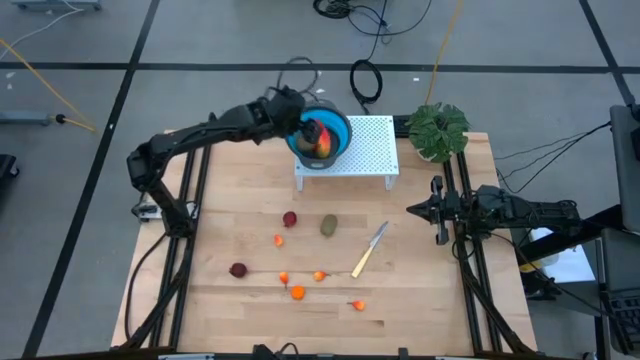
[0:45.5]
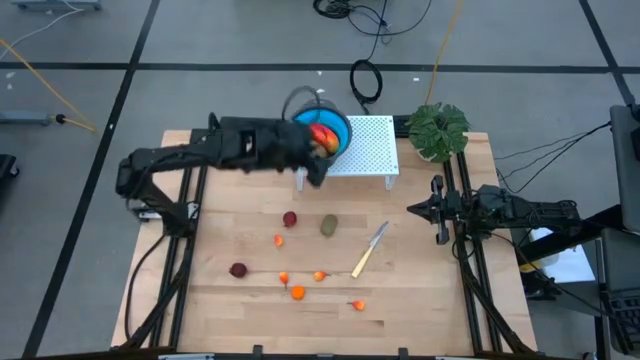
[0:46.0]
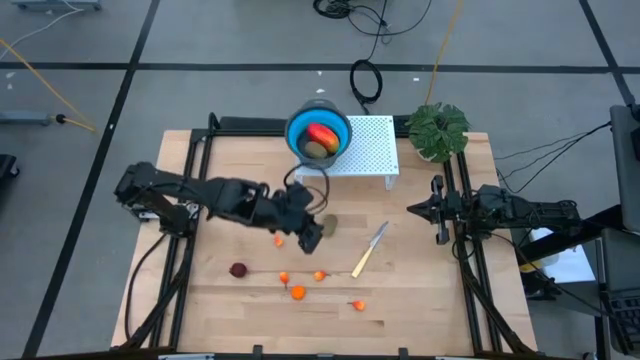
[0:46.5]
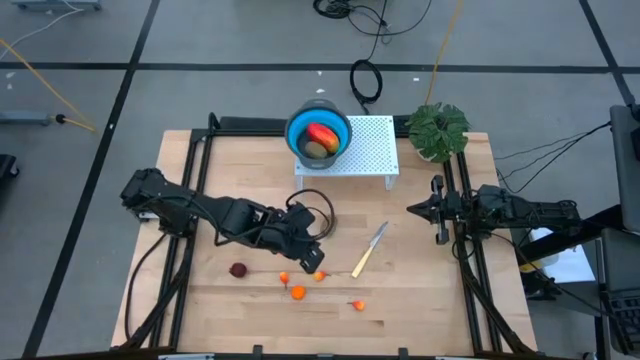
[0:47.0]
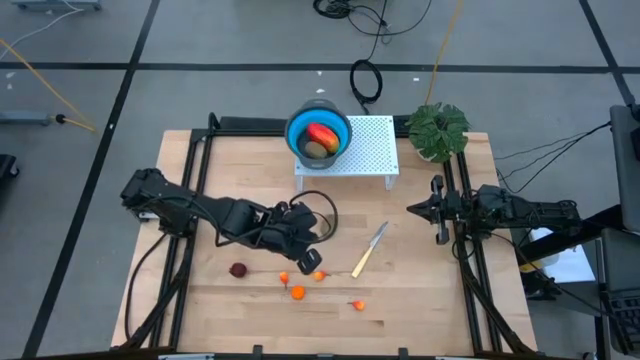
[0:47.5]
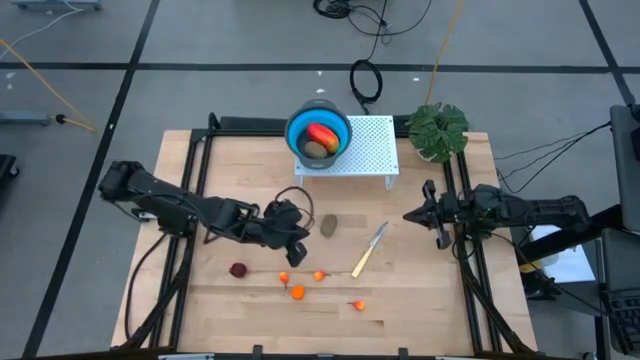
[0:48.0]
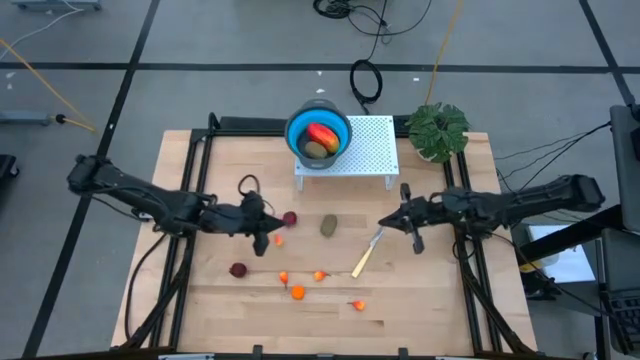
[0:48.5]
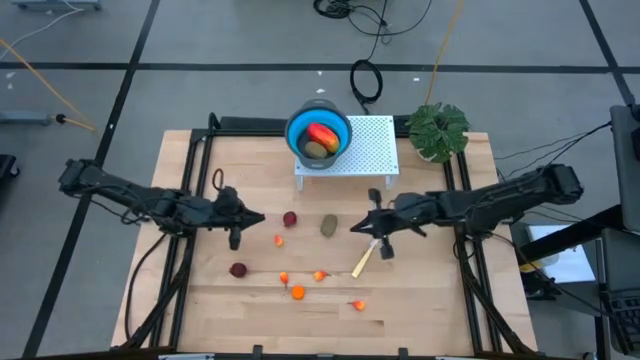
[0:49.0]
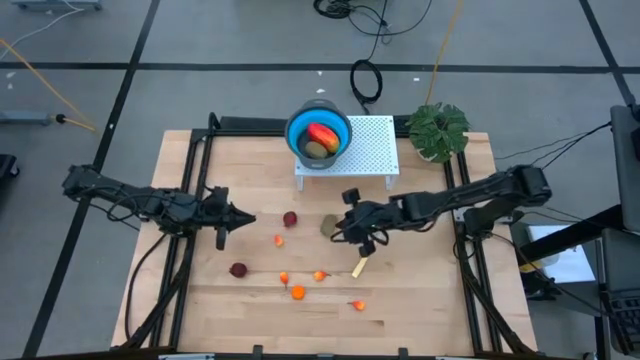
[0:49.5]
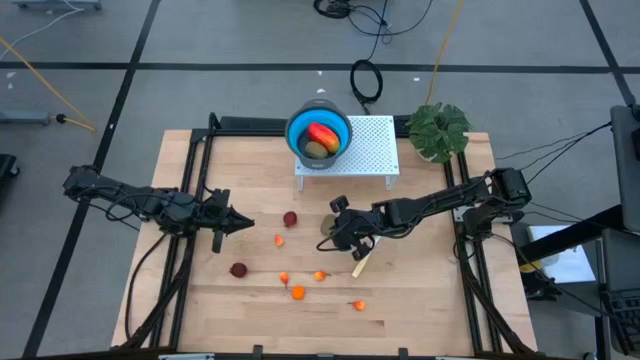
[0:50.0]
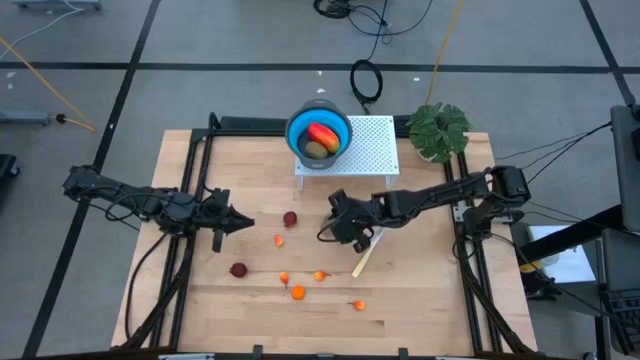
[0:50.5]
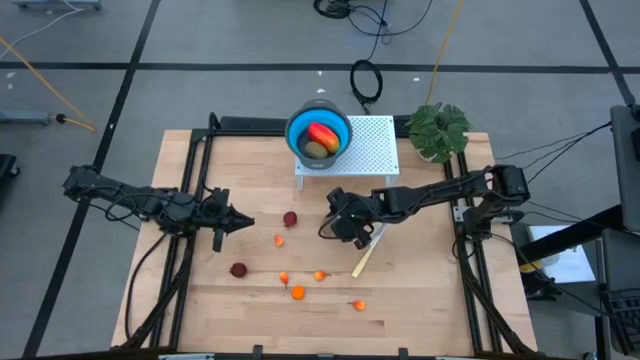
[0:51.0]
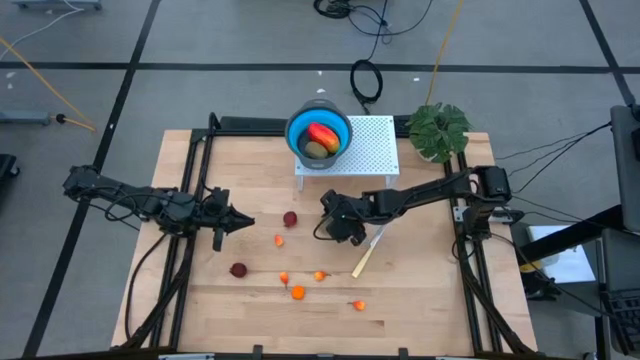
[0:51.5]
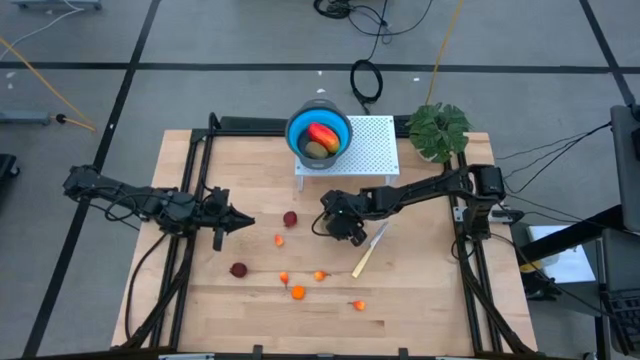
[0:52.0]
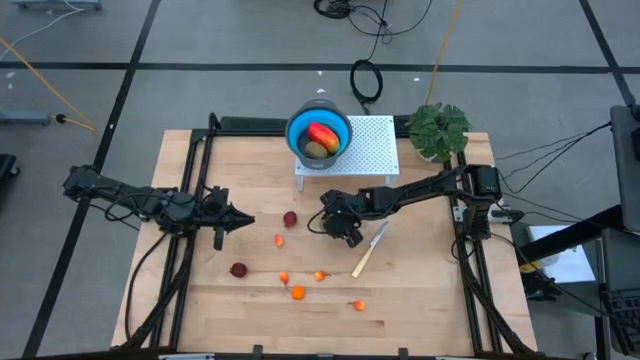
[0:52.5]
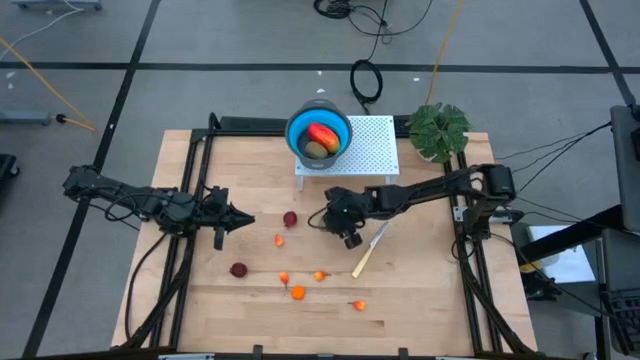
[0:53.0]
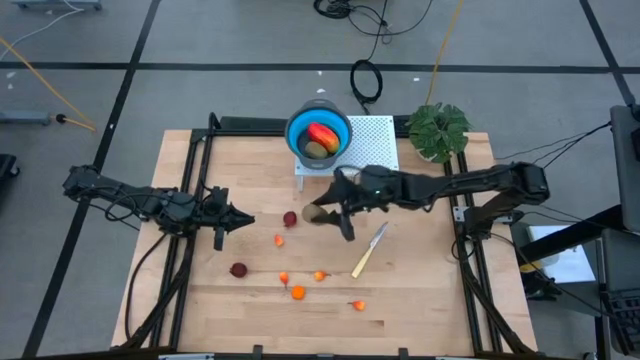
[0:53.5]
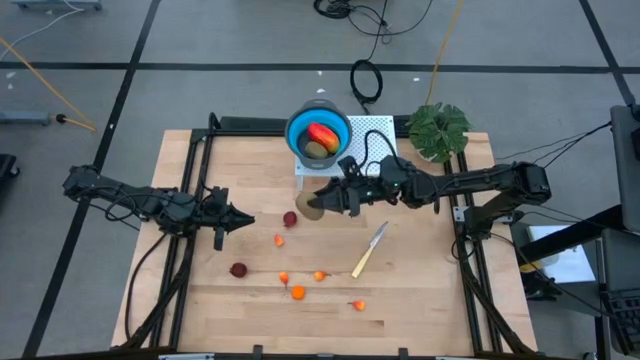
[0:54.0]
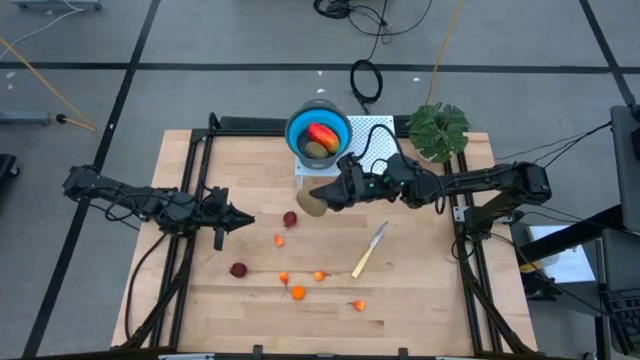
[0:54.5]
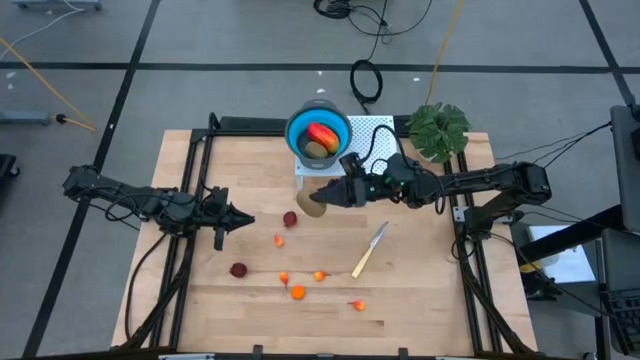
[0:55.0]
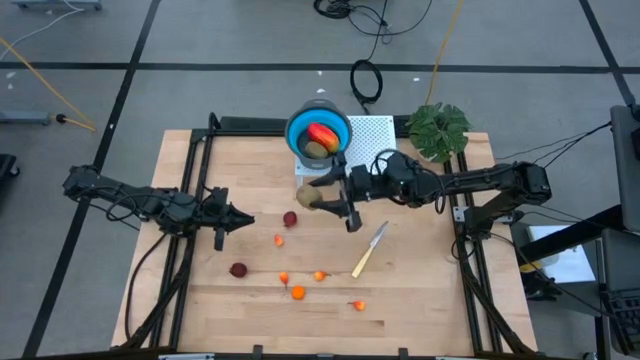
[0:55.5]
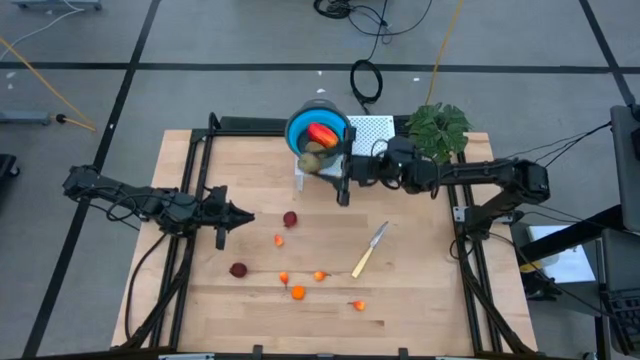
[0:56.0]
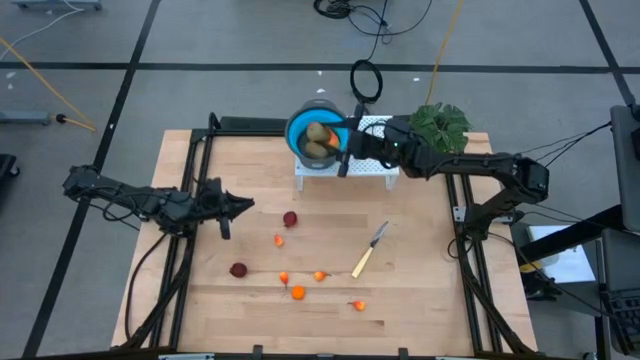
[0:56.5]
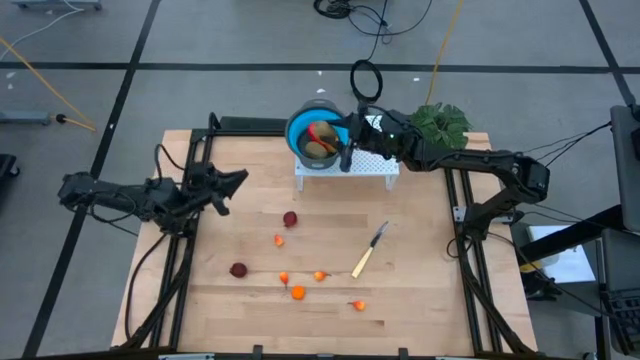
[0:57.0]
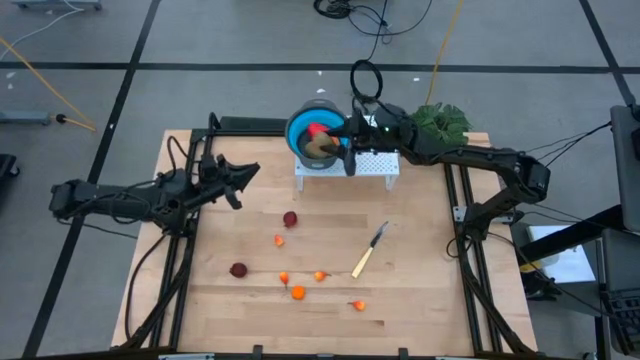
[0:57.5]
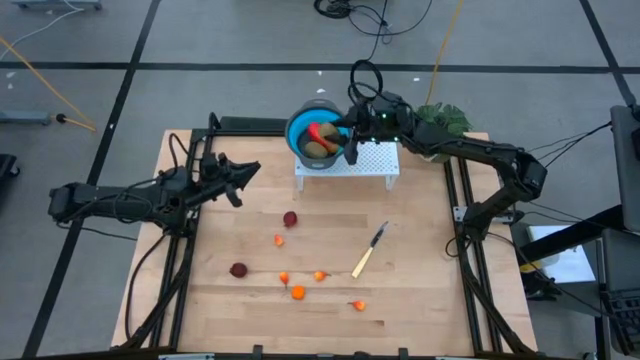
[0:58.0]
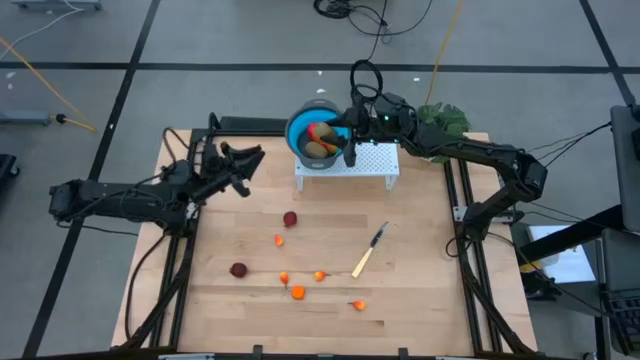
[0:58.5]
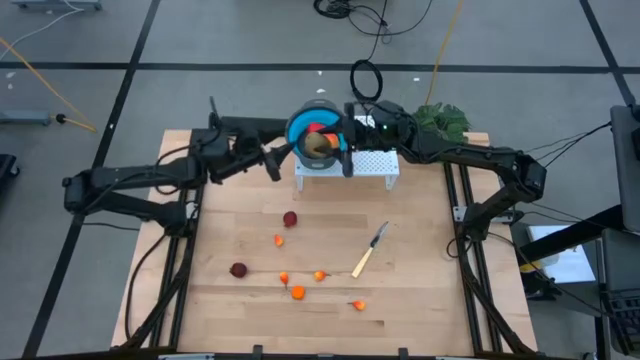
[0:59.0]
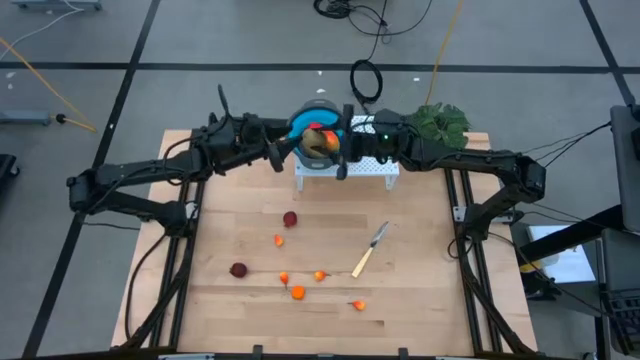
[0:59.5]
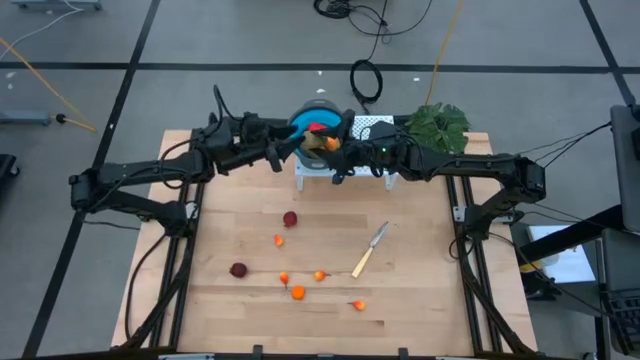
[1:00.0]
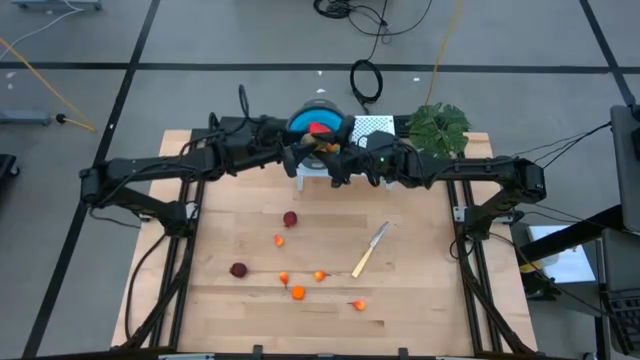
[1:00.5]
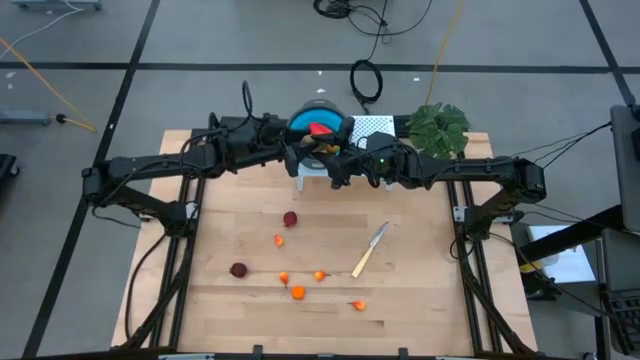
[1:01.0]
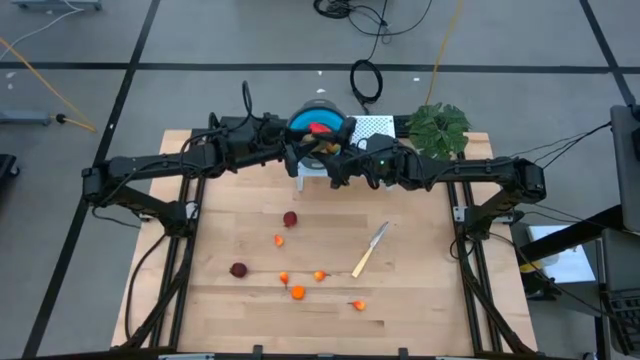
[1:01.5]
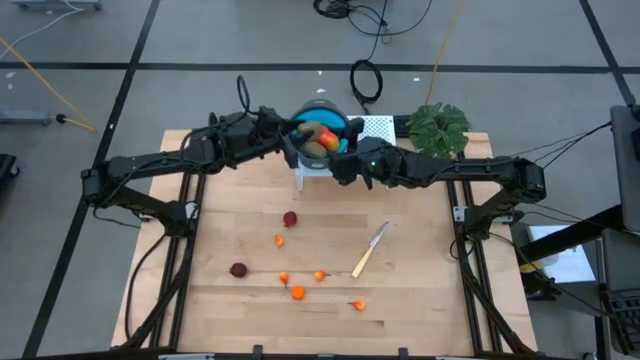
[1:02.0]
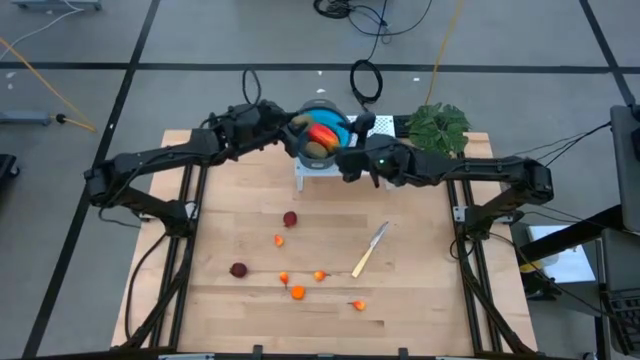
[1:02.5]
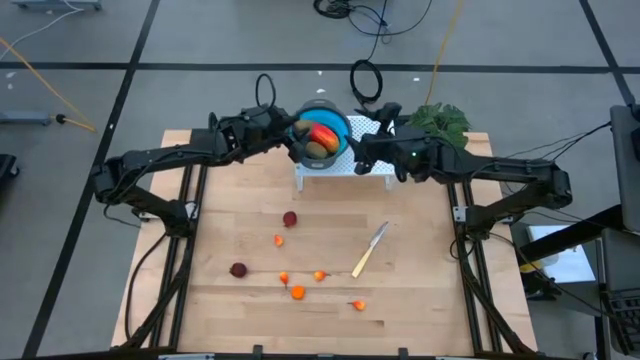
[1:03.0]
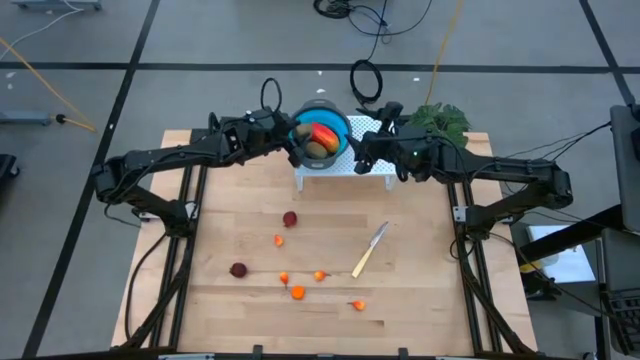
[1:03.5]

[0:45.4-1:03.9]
Task: Pick & Place Fruit
Put the green kiwi into the blue strainer bowl on the shelf

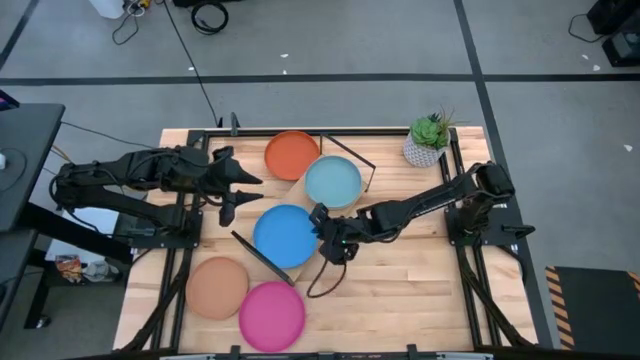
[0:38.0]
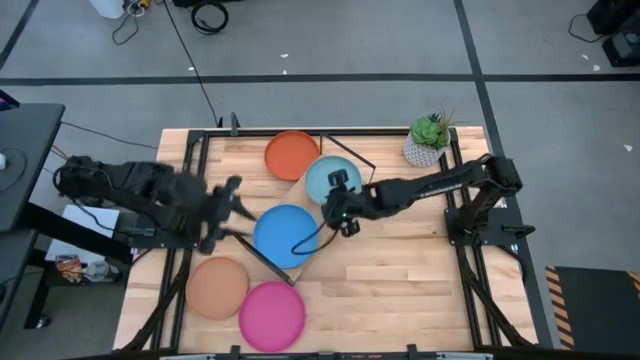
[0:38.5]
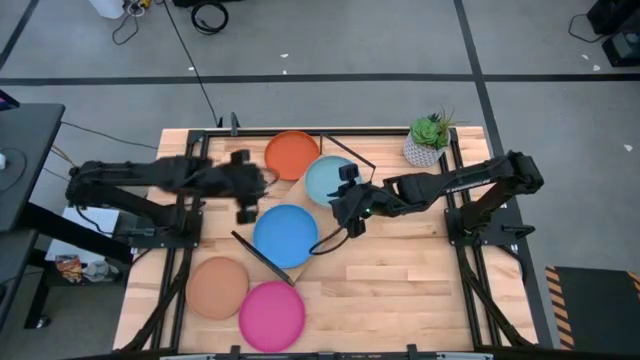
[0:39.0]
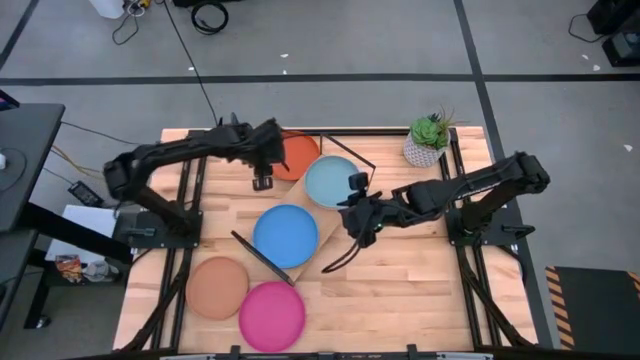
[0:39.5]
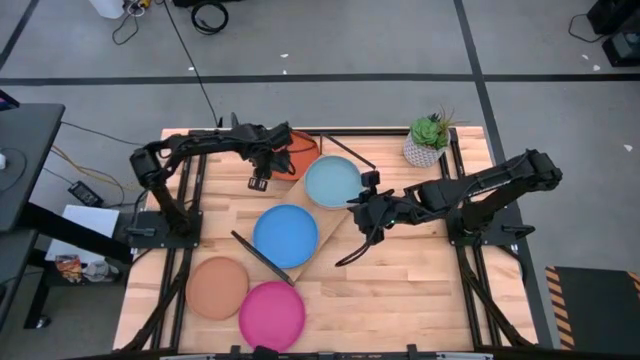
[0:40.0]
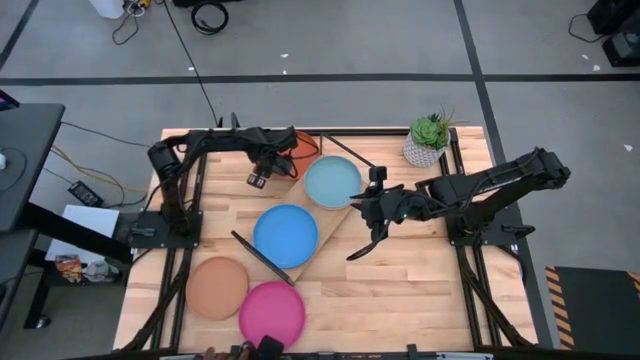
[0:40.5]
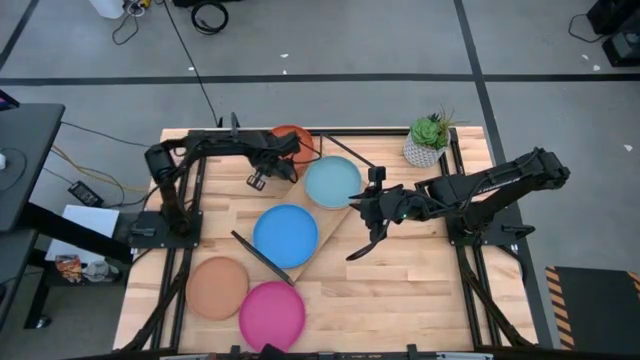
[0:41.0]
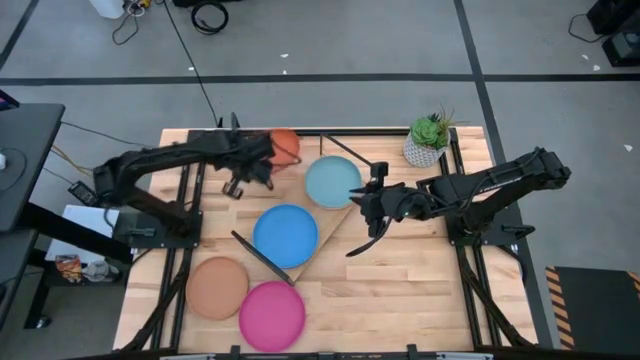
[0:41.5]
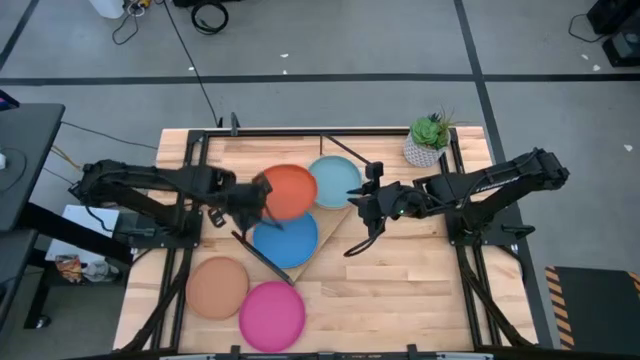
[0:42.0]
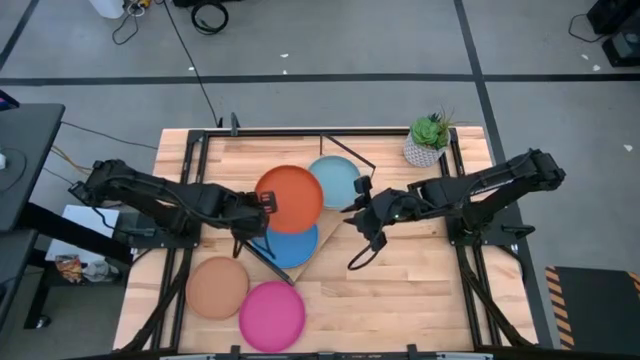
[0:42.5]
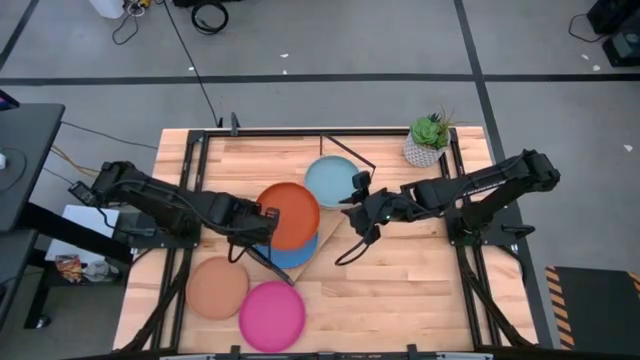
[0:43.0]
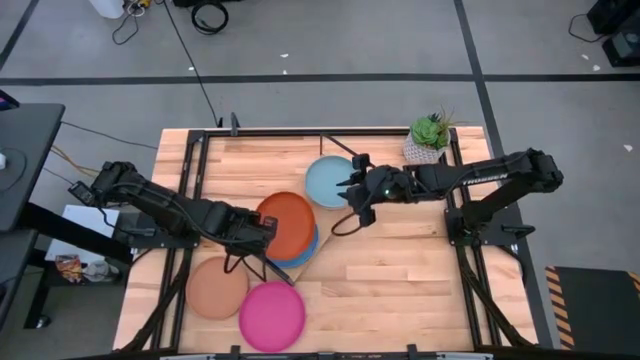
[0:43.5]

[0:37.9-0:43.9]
Task: Place and stack plates onto a shelf
Stack the orange plate on top of the blue plate on the shelf
